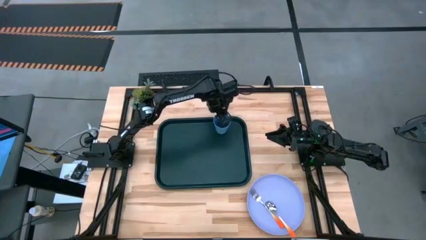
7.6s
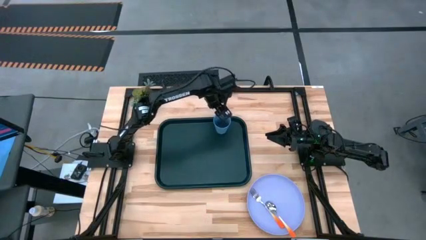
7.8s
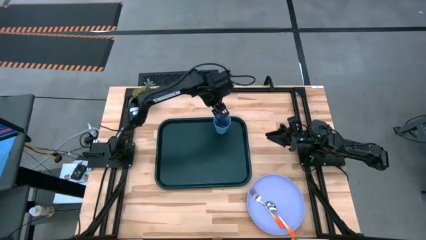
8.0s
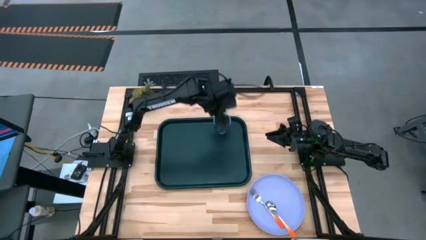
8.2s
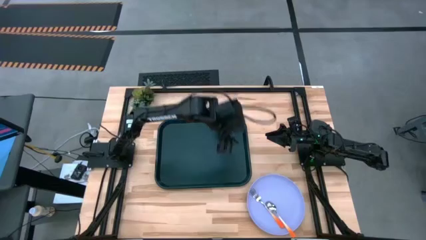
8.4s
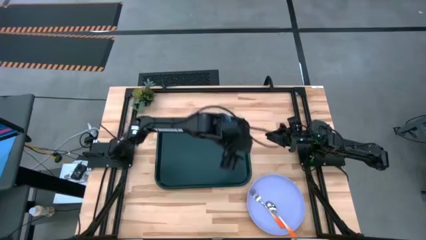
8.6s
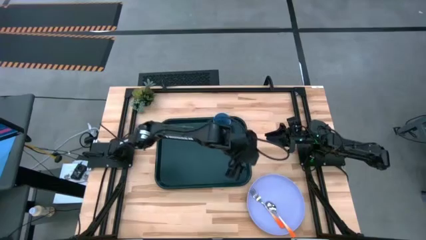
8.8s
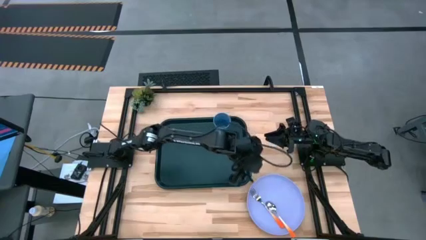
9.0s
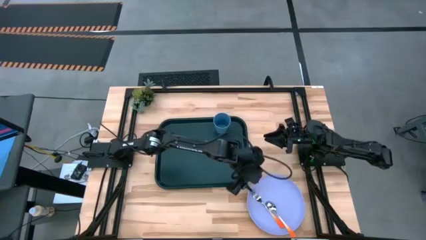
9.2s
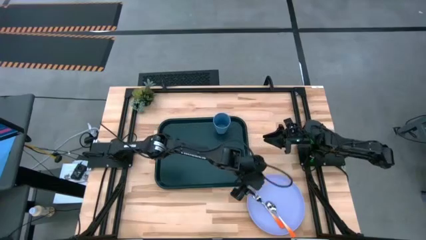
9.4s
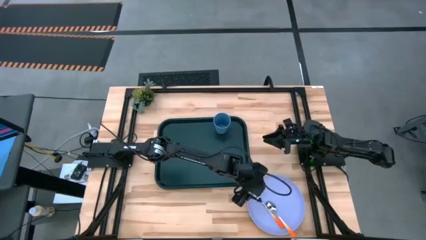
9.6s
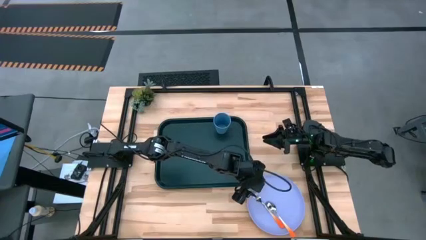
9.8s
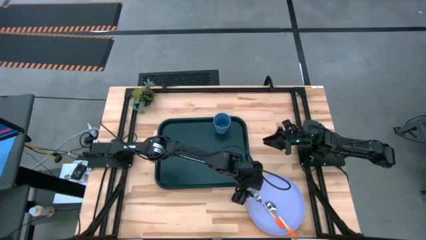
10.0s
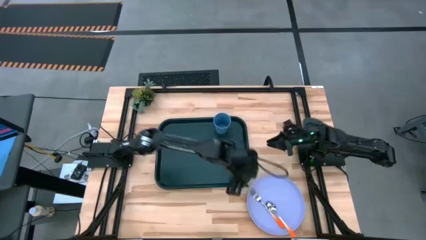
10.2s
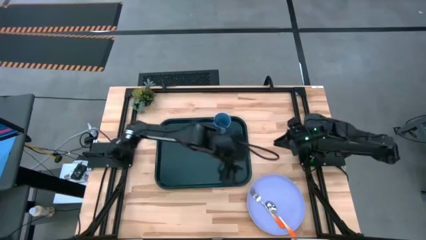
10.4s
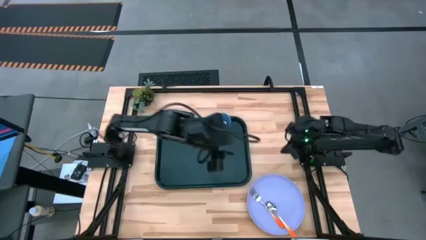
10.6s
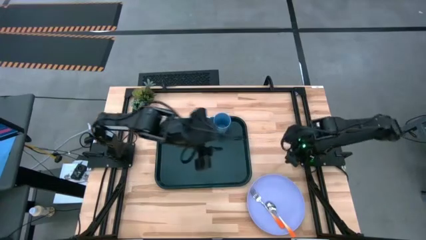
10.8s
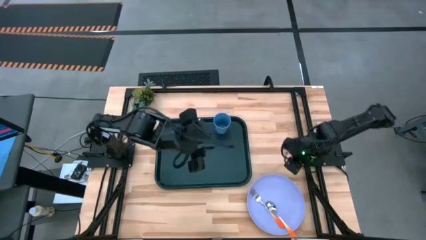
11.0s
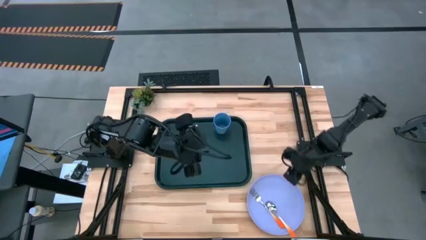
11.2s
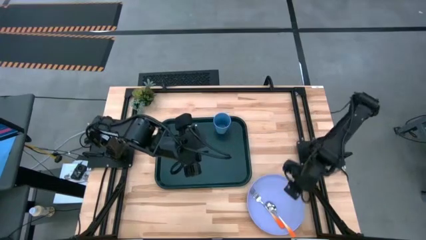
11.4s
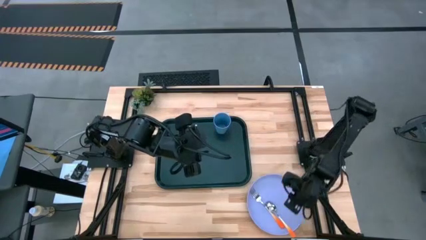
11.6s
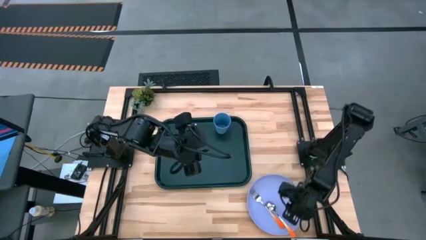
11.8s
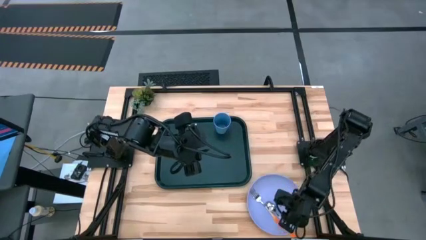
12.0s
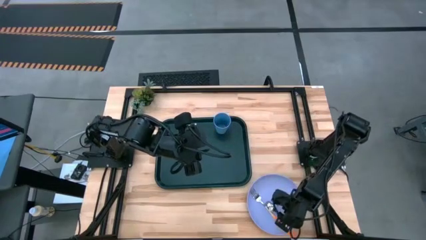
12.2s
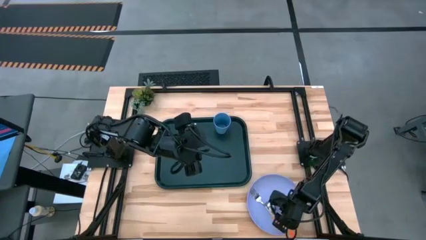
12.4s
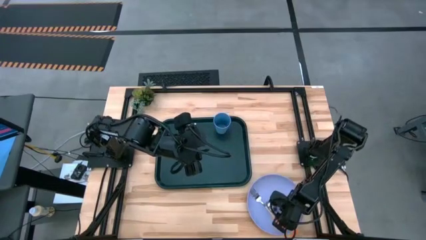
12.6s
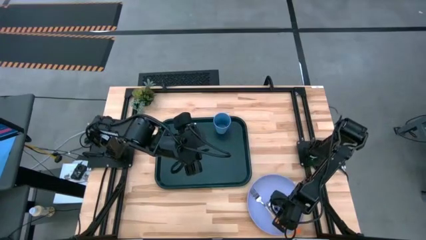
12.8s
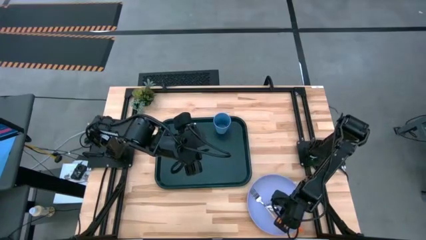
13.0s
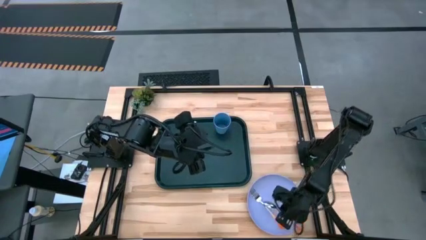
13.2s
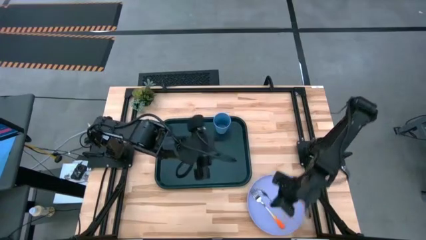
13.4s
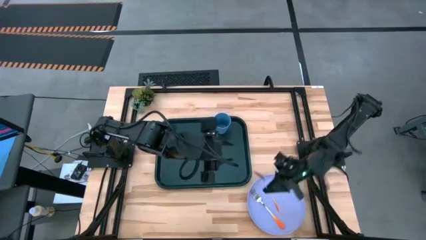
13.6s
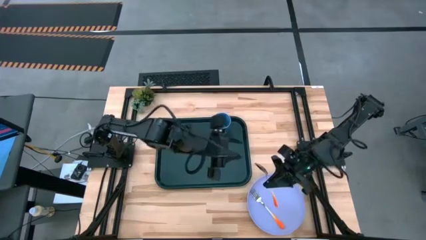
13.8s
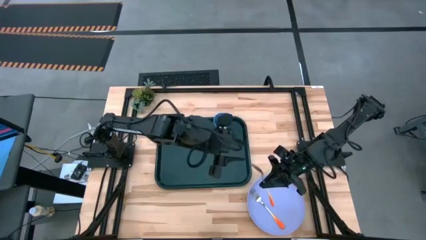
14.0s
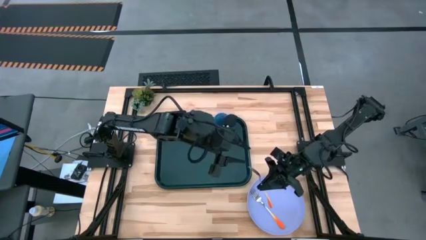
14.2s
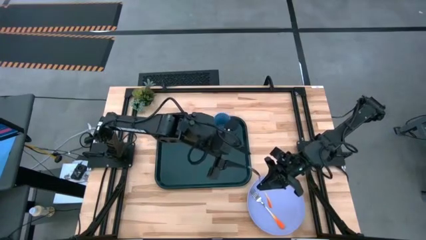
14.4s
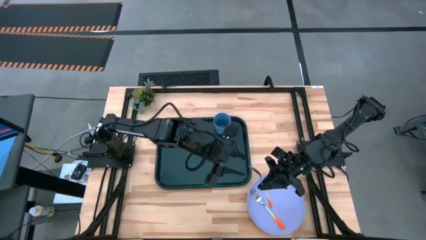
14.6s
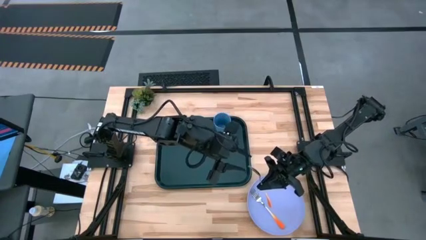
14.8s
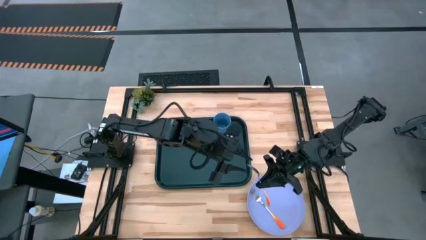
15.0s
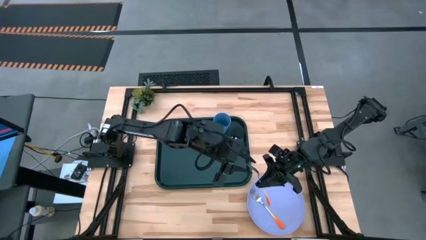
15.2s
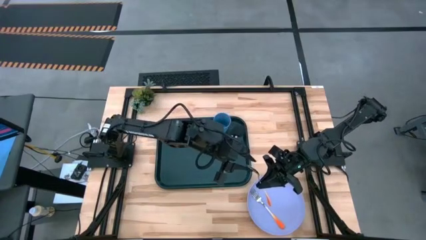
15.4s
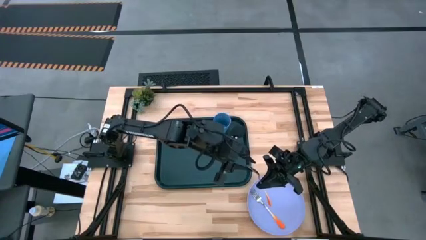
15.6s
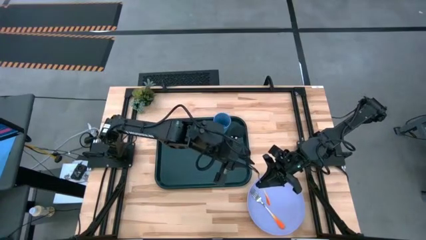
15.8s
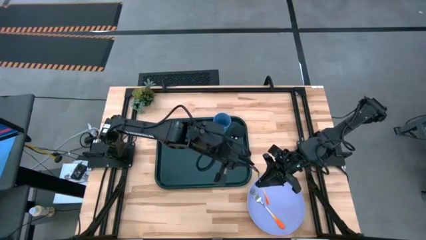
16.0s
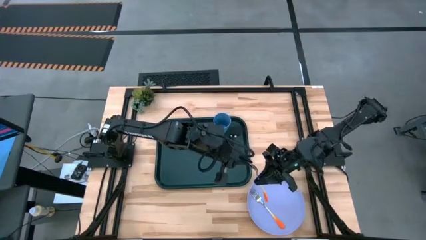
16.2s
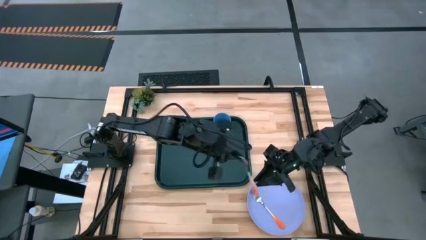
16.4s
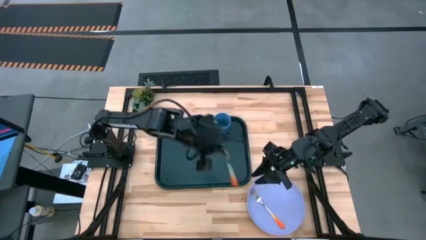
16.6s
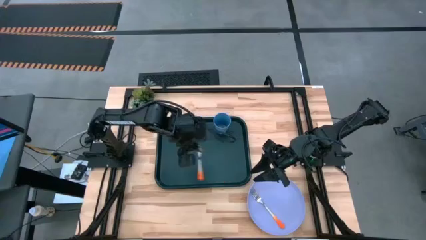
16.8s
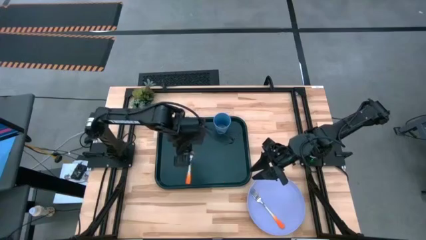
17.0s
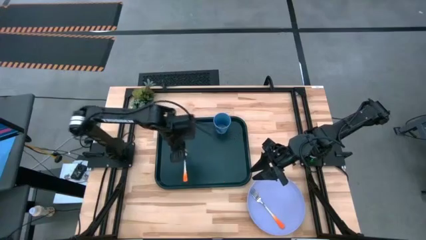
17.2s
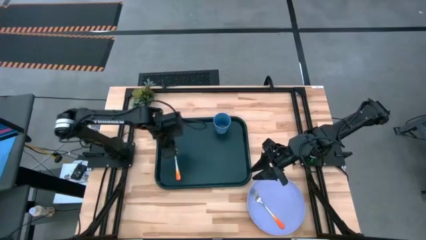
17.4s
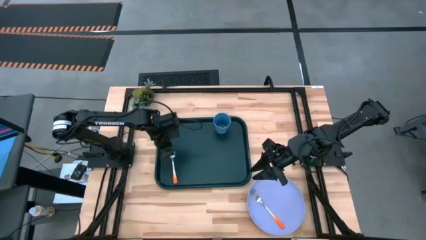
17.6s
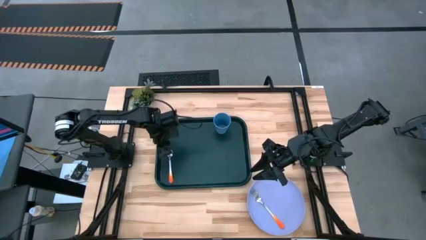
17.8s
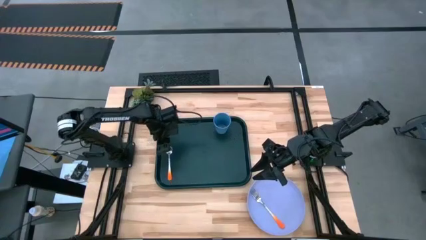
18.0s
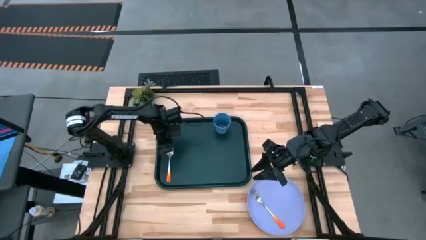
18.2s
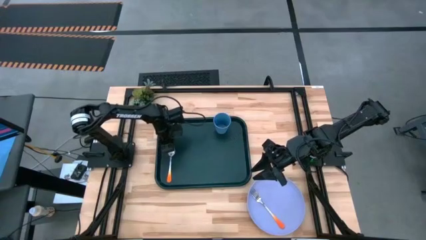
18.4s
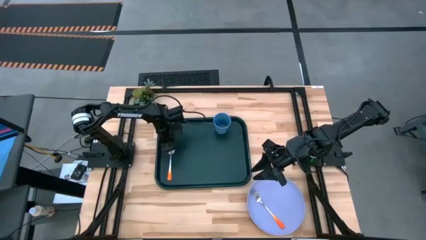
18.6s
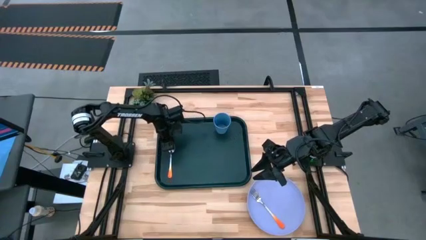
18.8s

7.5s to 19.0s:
Task: Pick and place plate/cup/fork/spoon on tray
Put the orange spoon on the black tray

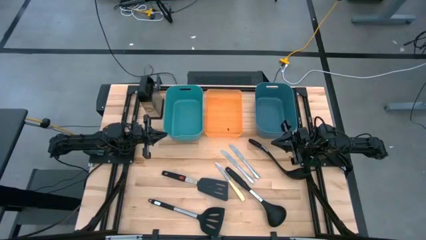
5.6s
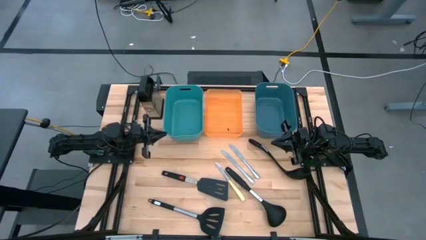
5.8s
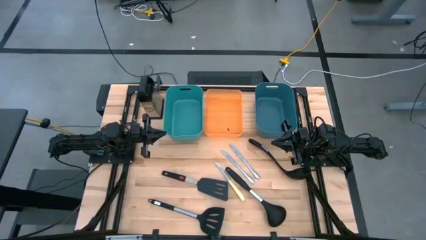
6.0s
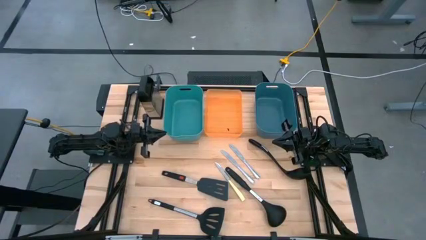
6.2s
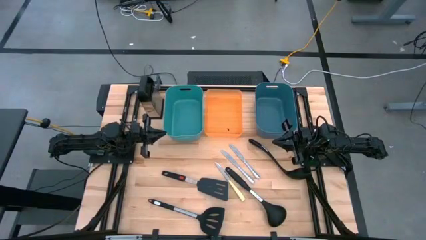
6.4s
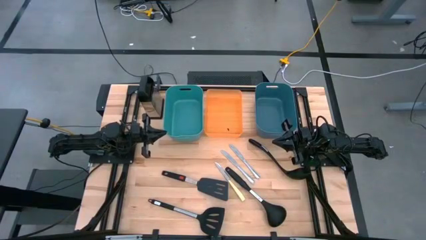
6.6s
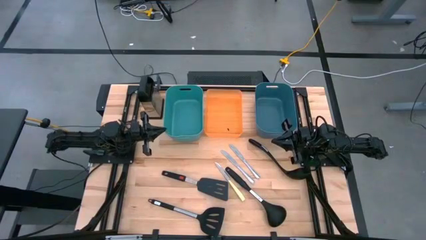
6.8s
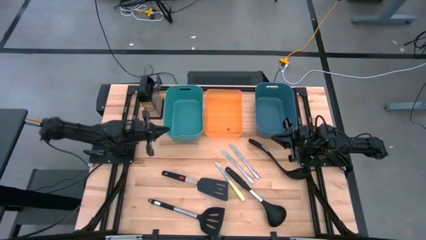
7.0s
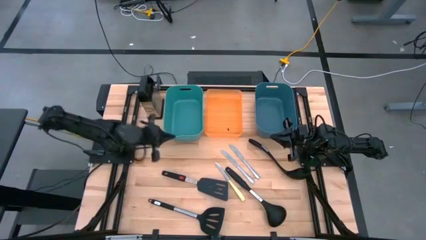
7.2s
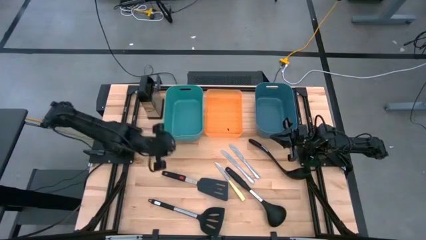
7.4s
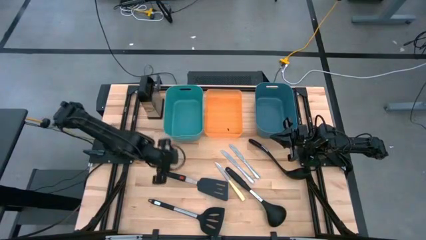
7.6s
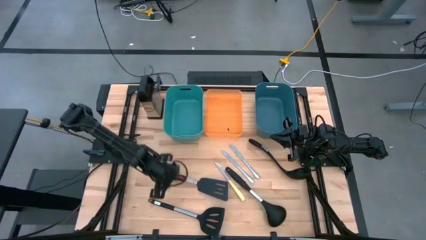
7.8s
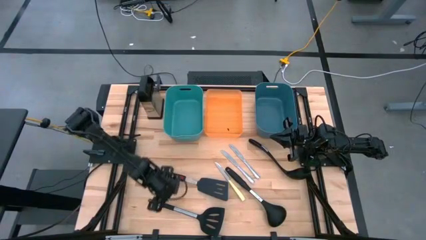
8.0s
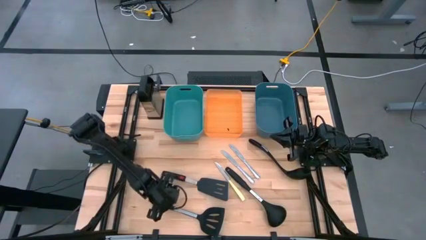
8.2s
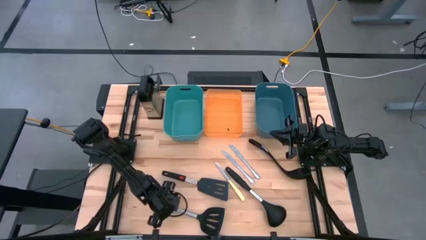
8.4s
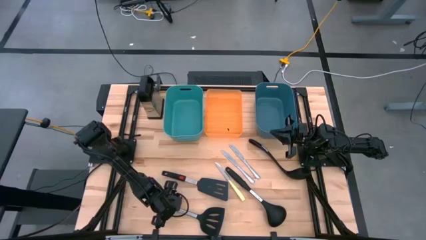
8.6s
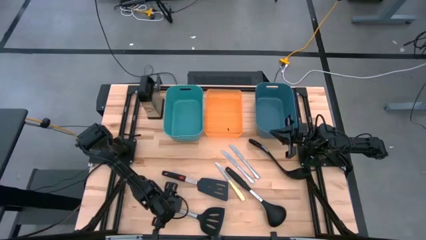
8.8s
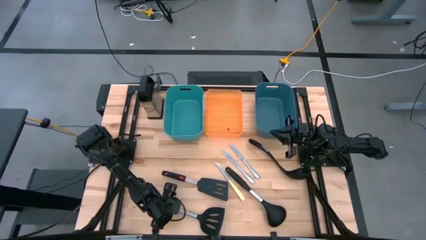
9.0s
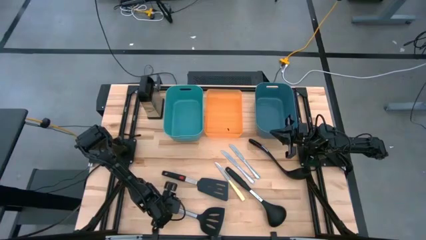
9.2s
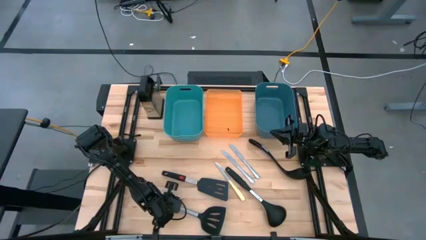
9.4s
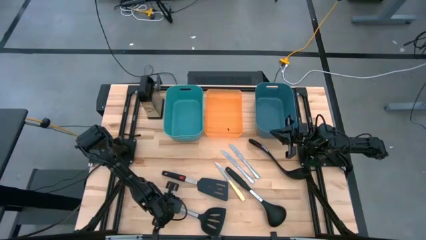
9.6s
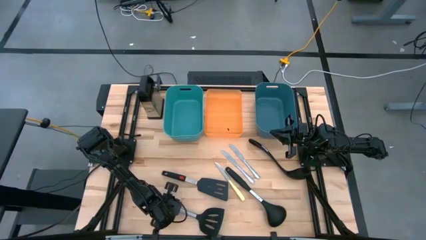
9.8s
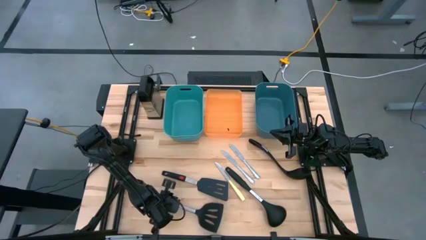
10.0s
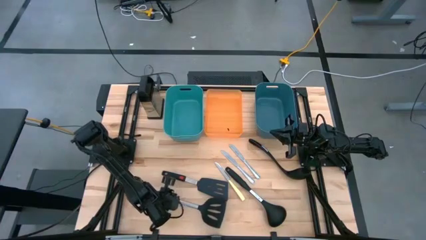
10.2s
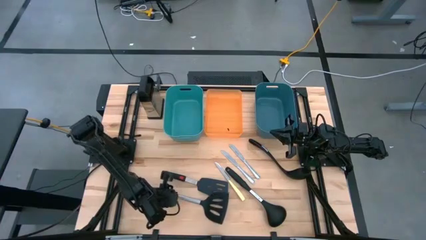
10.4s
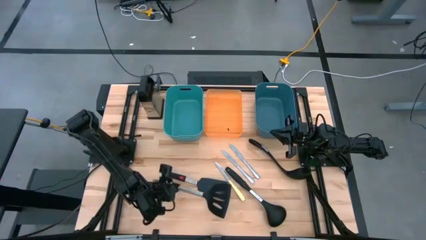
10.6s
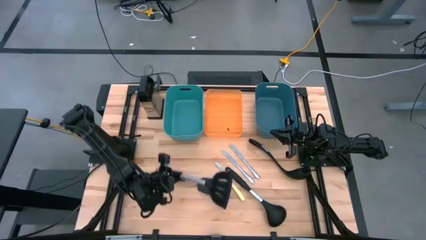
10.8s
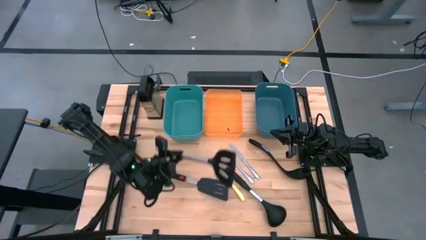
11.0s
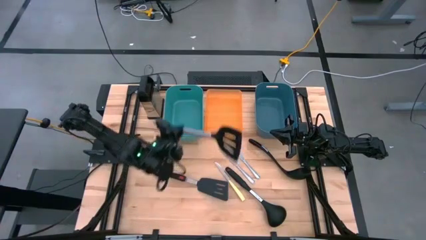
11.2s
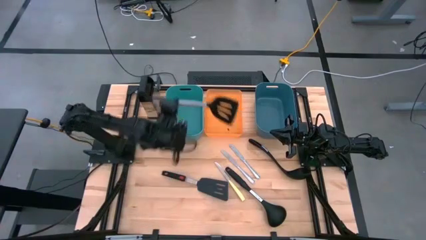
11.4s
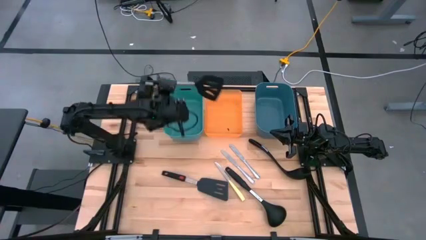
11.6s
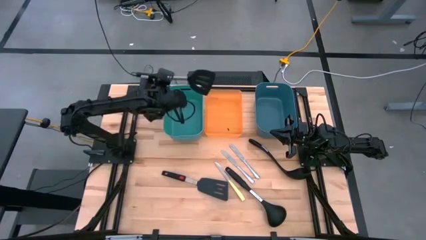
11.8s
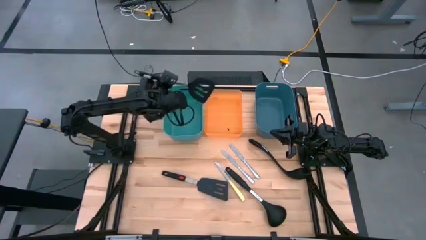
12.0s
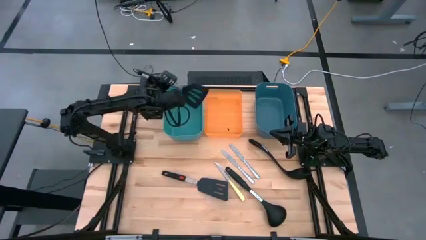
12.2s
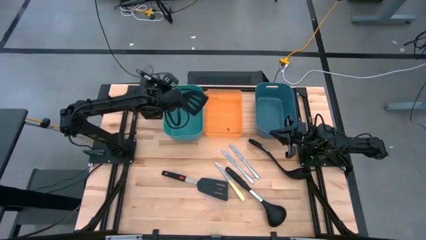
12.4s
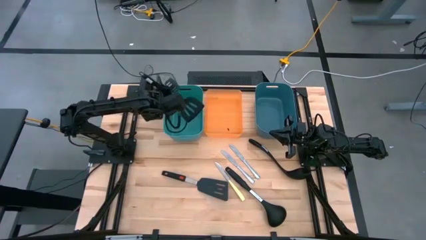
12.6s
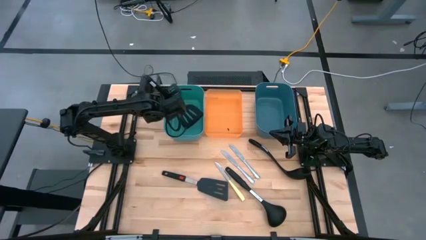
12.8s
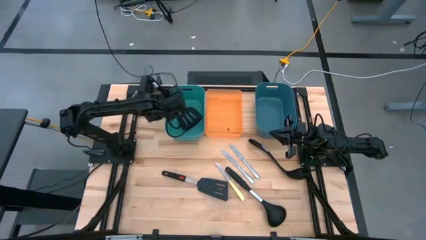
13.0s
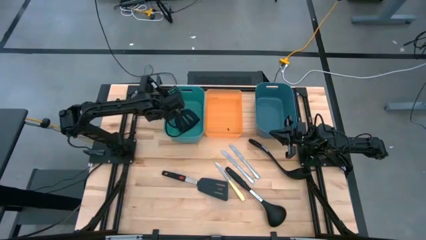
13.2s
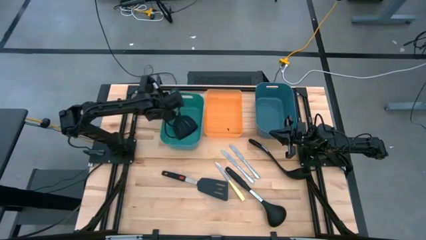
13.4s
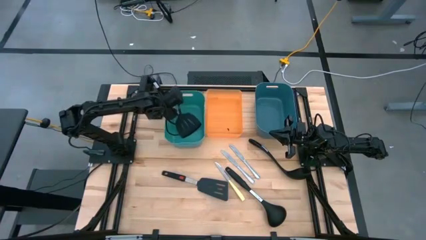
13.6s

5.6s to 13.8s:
Task: Pick & Place Kitchen Items
Put the bottom black slotted spatula into the green bin
